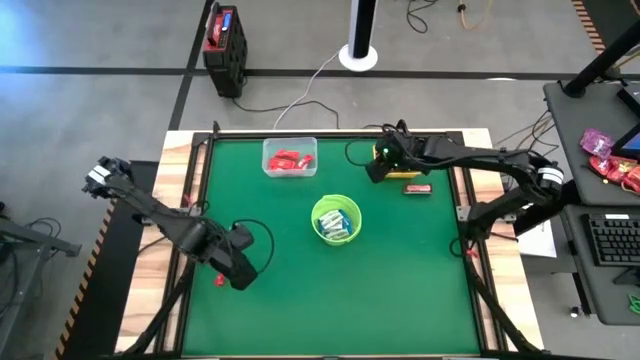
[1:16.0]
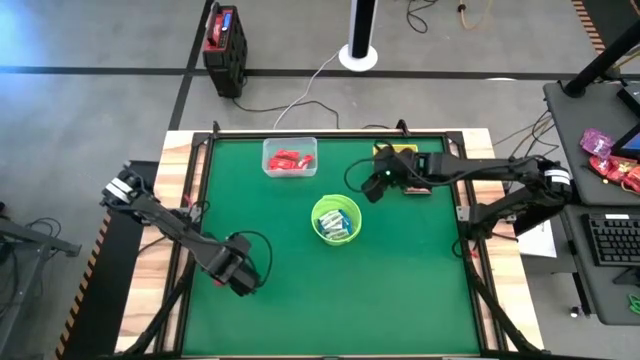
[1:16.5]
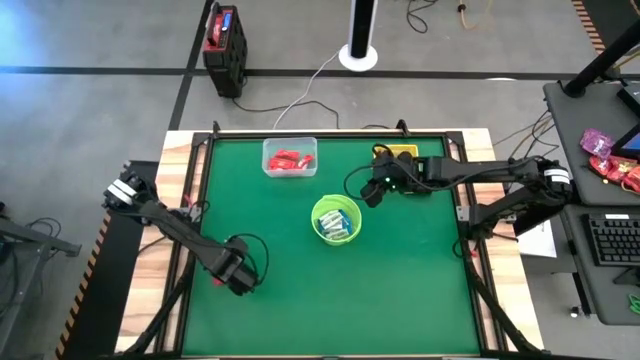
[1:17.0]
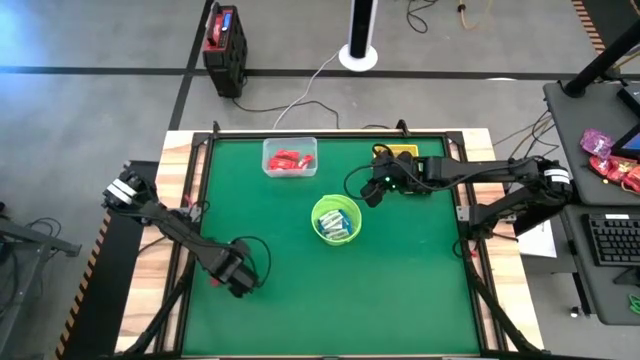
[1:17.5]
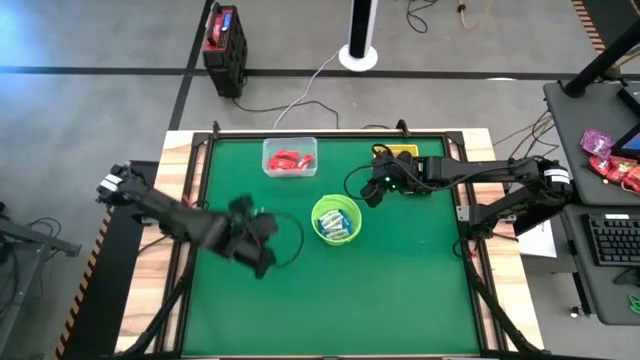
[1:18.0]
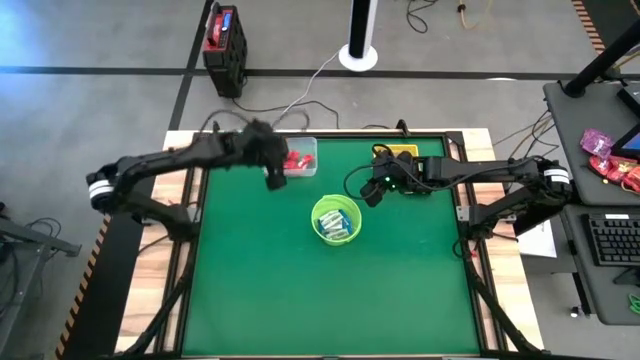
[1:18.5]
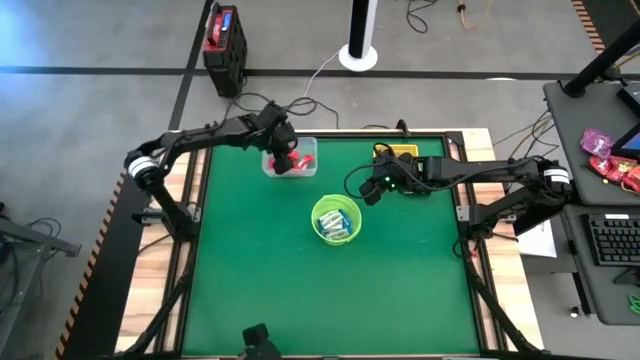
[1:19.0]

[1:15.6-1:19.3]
Task: Sort candy by brand, put in halloween buckets
Put the red chocolate into the transparent bin

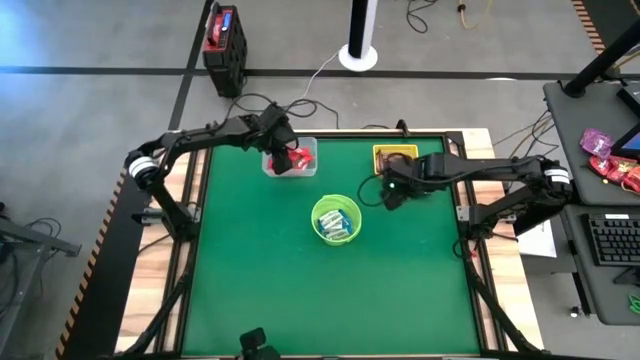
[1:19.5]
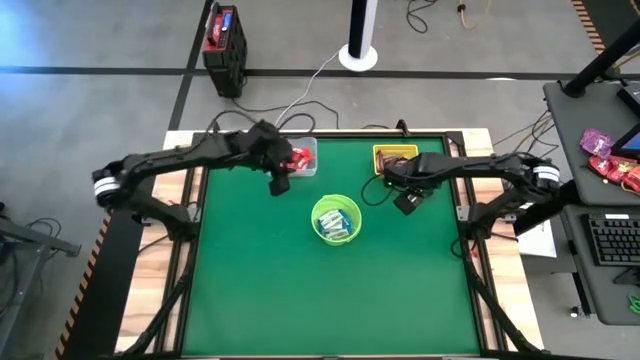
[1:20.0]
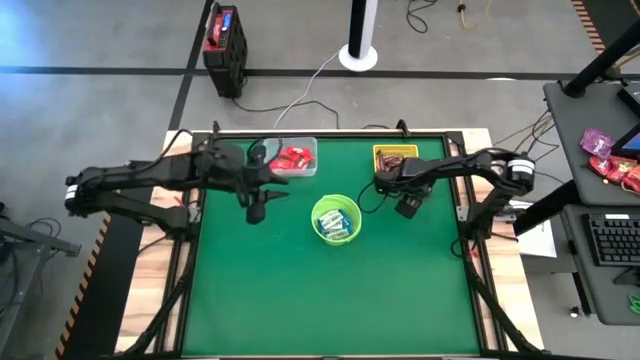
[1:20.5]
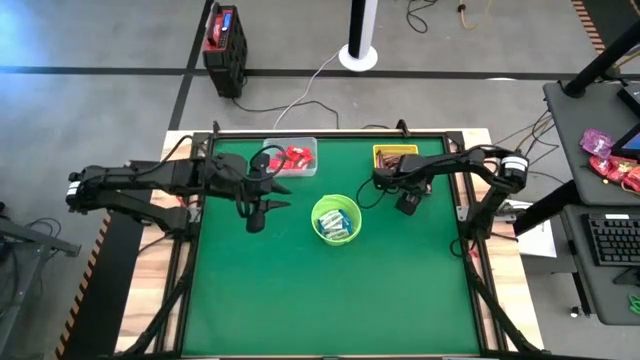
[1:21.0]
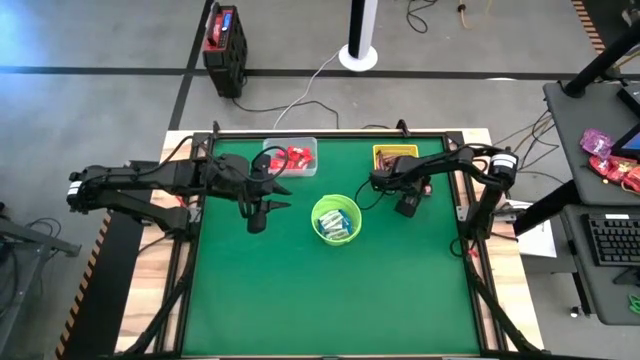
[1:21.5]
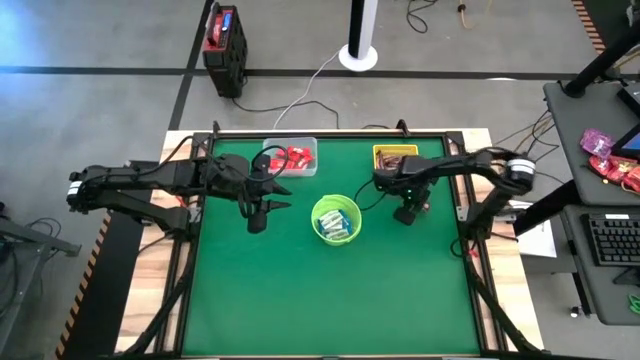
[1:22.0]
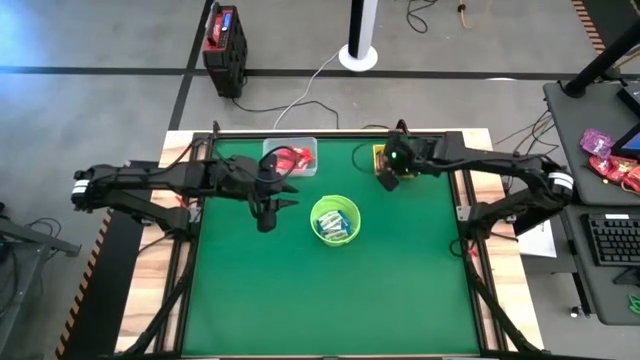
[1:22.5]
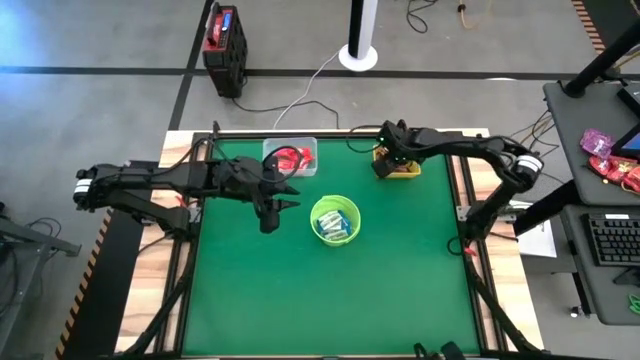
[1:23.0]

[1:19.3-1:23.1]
Put the brown chocolate into the yellow bin

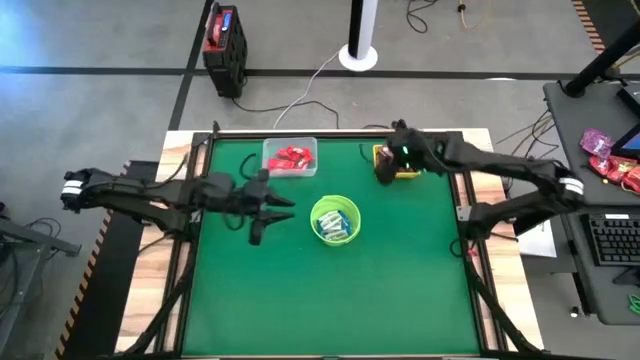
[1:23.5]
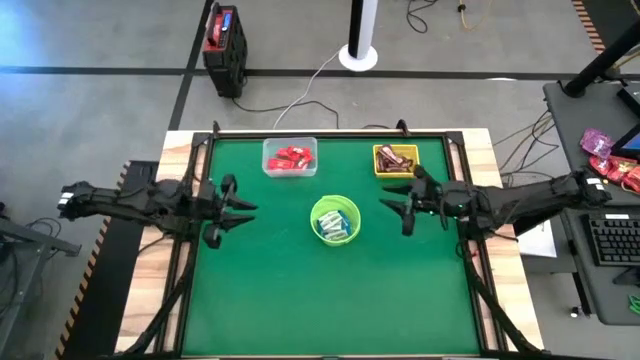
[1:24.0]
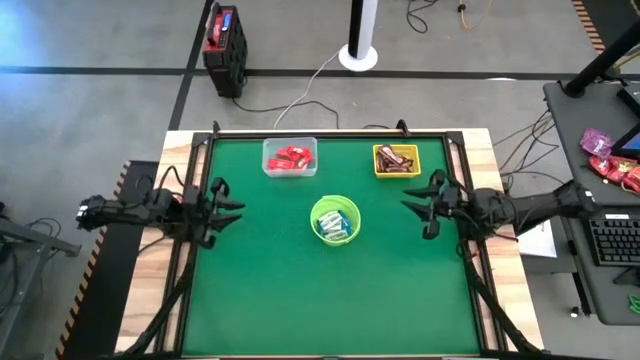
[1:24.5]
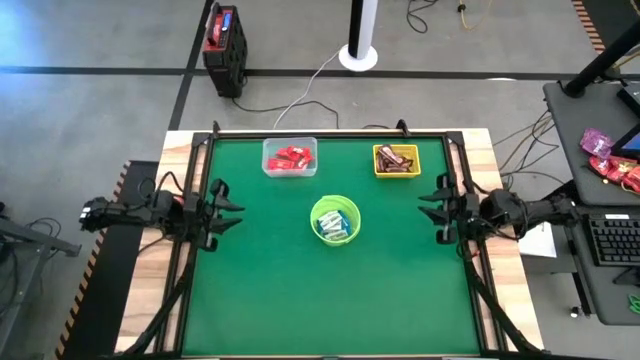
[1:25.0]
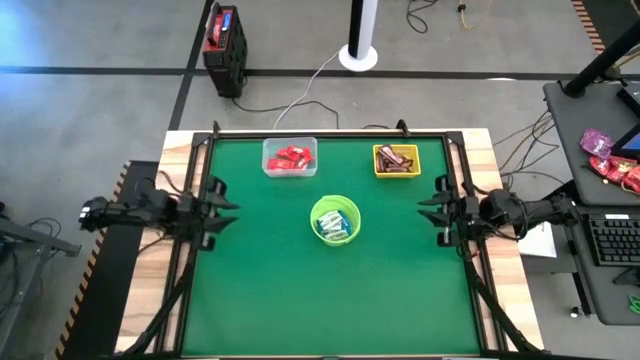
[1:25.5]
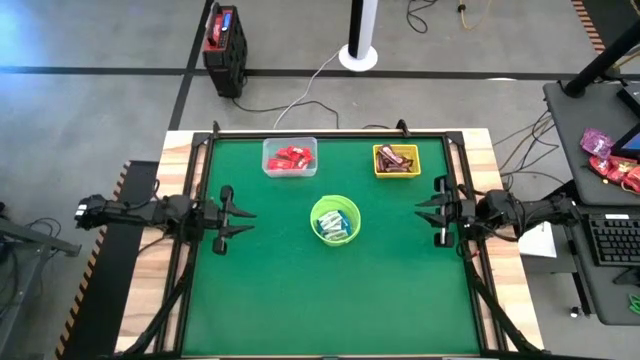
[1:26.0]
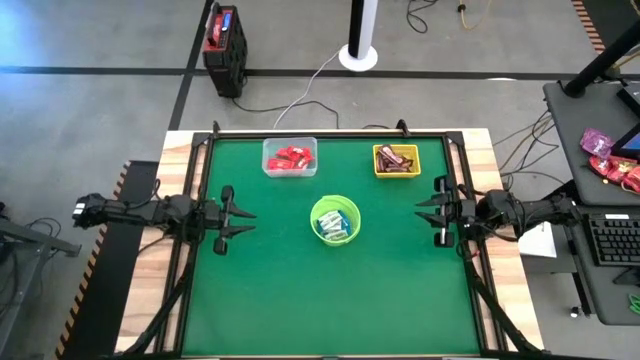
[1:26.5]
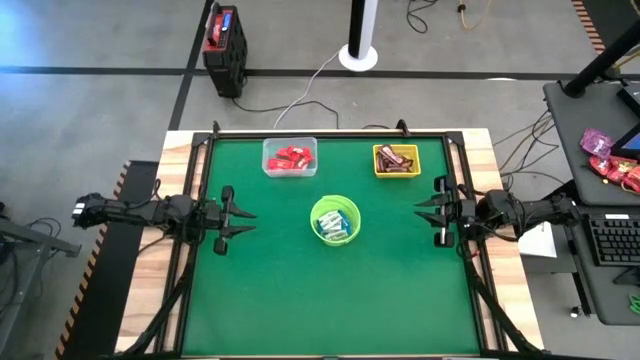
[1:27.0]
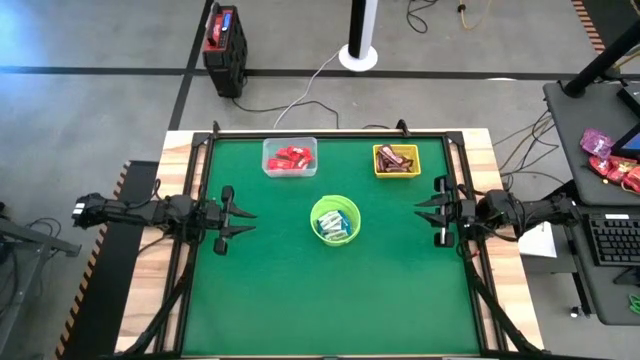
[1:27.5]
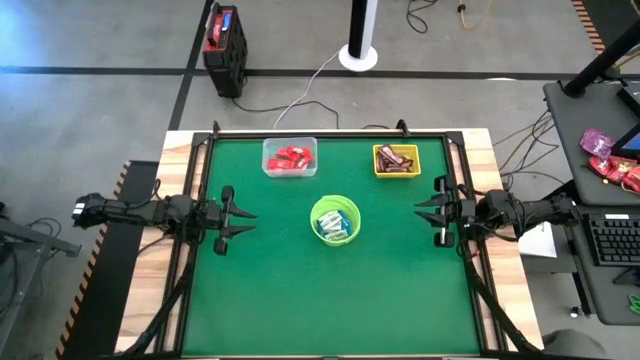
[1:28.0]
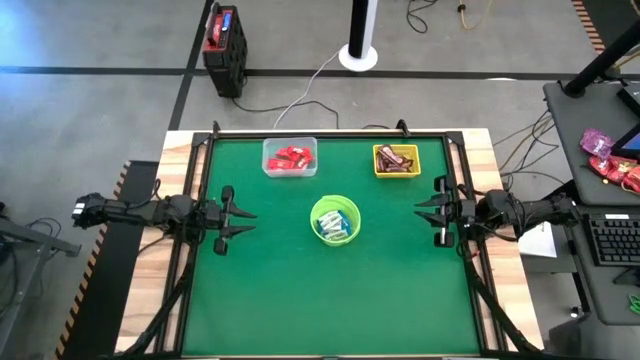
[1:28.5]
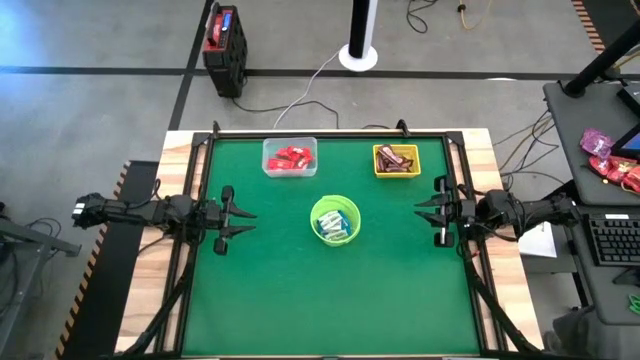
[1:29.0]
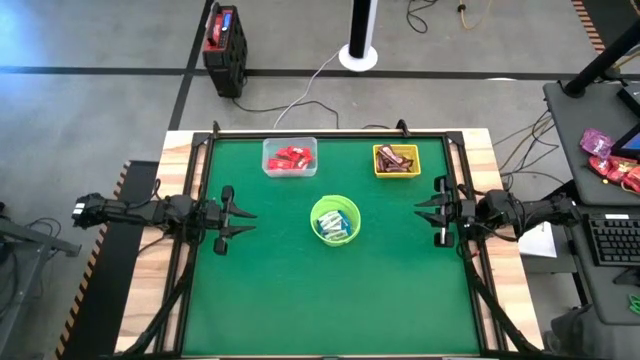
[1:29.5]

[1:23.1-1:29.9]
Return to Home Position

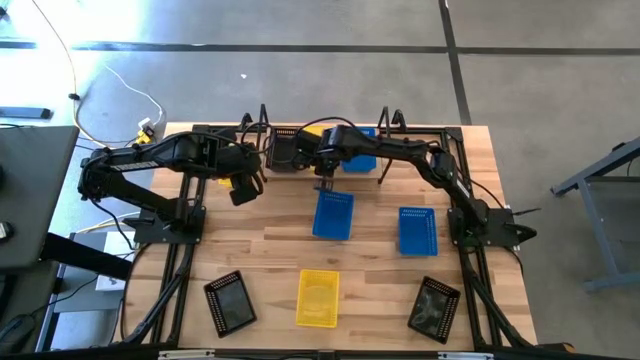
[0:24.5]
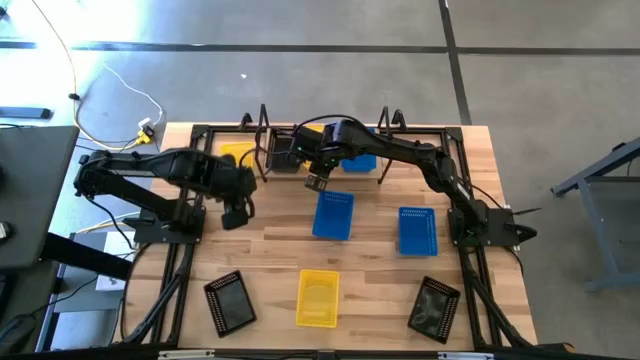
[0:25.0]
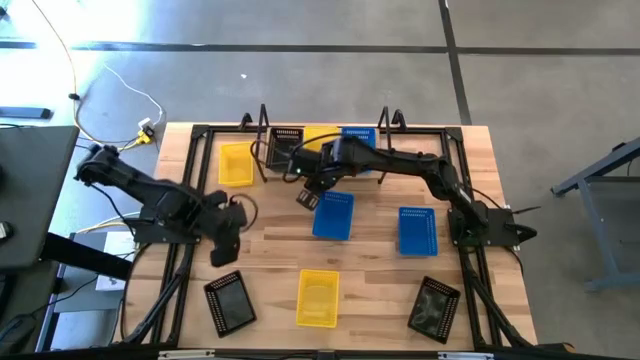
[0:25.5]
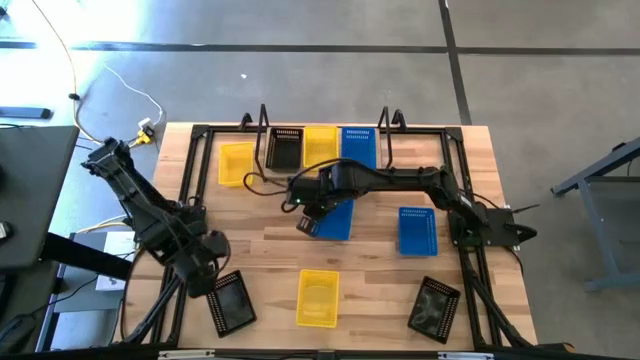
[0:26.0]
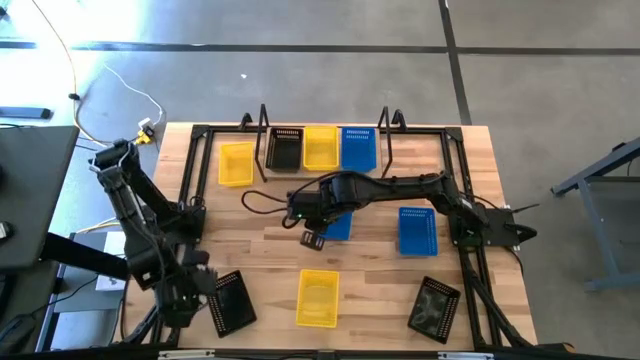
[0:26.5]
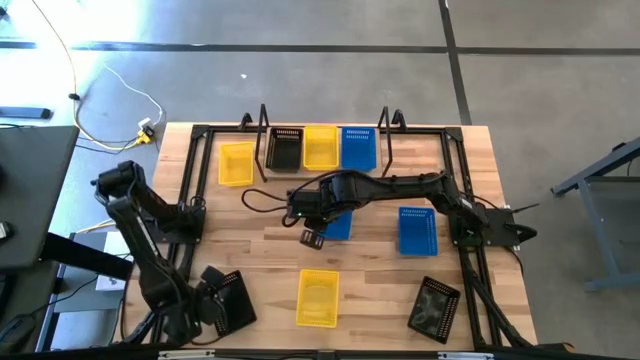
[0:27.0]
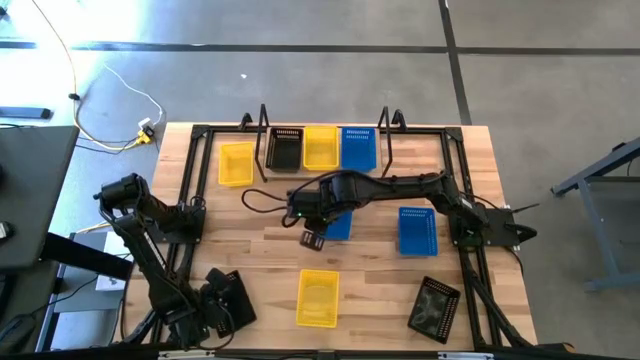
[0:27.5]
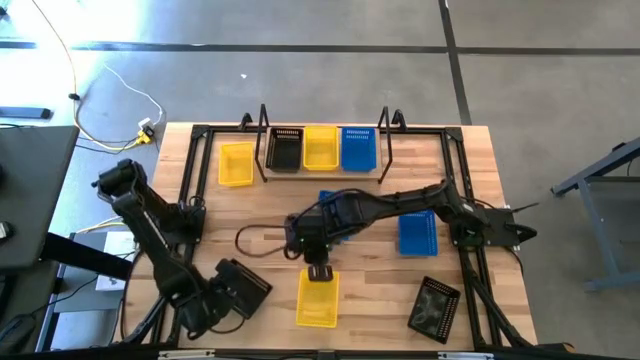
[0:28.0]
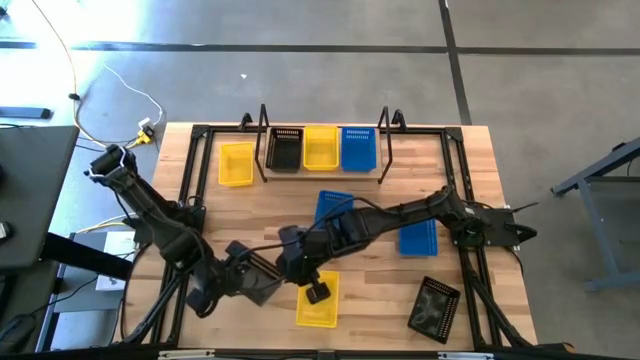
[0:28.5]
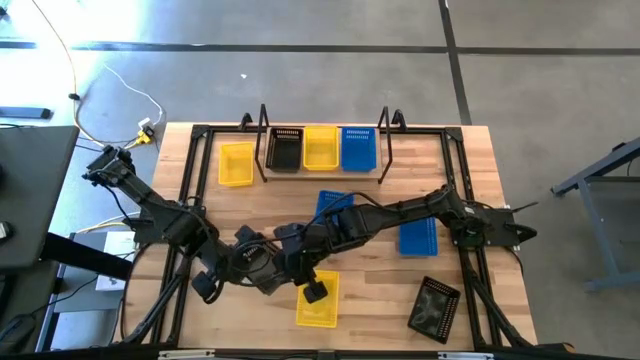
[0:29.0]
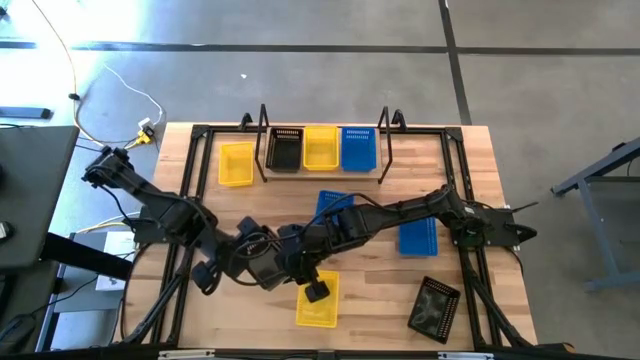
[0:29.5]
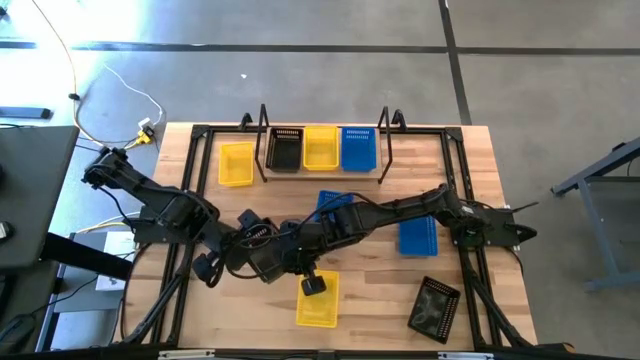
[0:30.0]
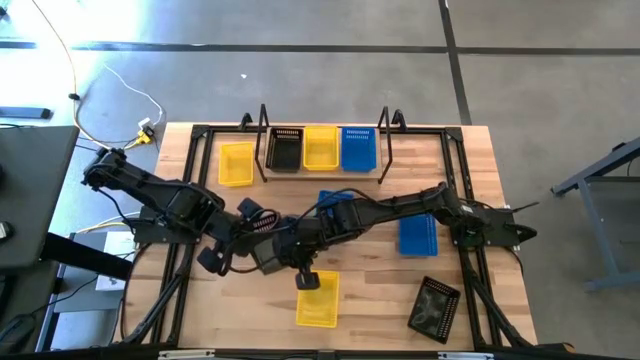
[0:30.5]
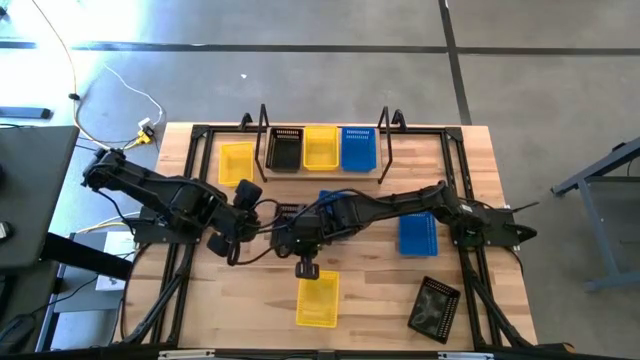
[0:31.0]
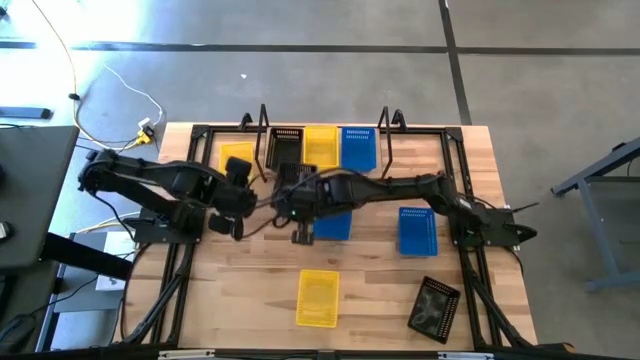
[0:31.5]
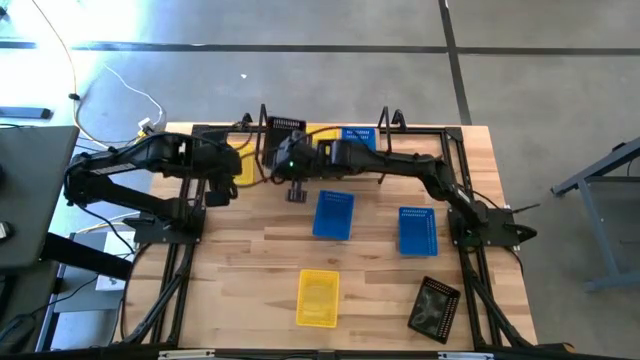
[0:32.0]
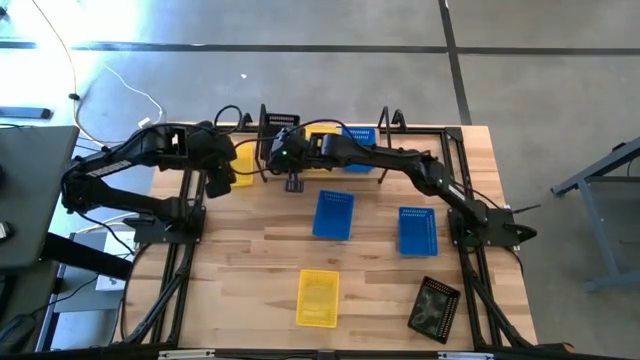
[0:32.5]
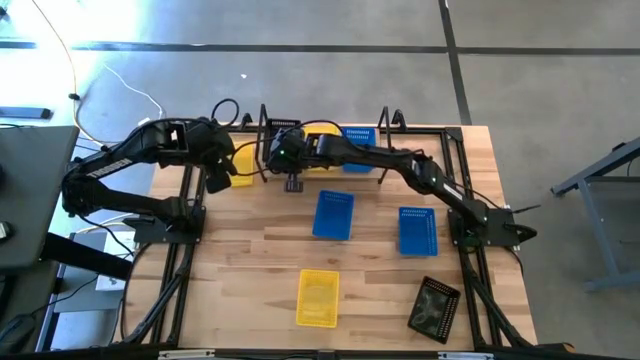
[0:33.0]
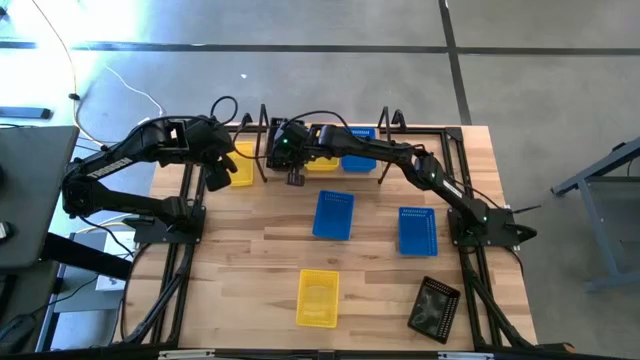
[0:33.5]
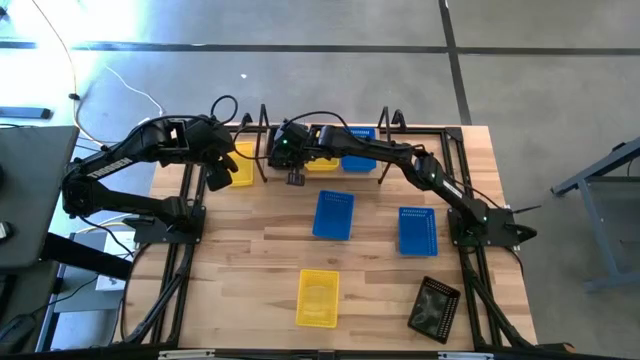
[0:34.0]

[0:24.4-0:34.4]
Task: Stack baskets on shelf by color
Stack the left black bin on top of the black bin on the shelf
